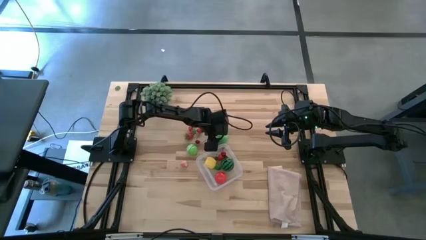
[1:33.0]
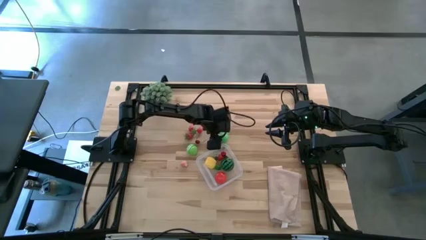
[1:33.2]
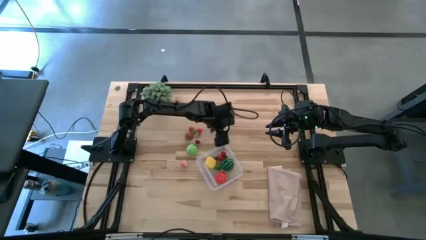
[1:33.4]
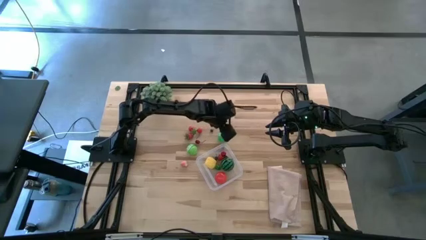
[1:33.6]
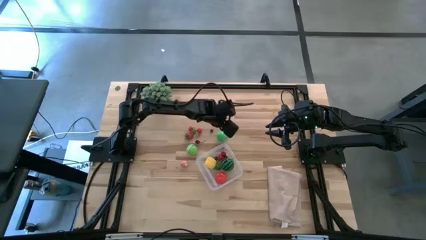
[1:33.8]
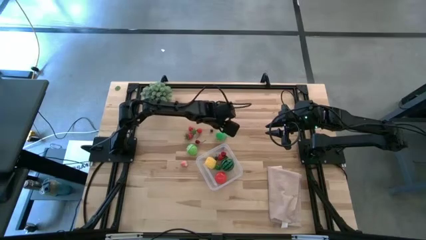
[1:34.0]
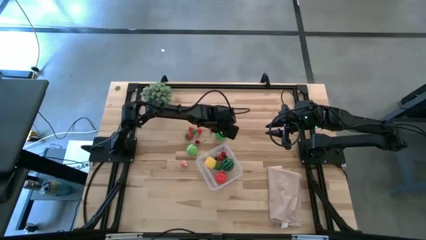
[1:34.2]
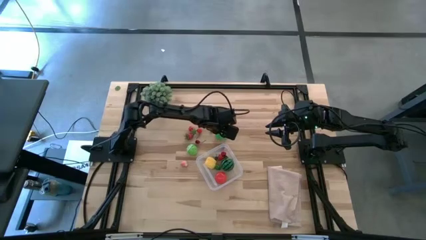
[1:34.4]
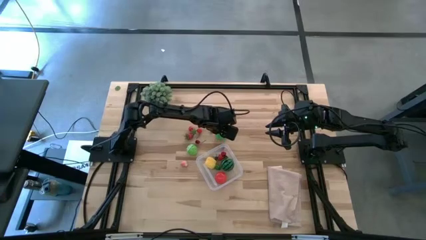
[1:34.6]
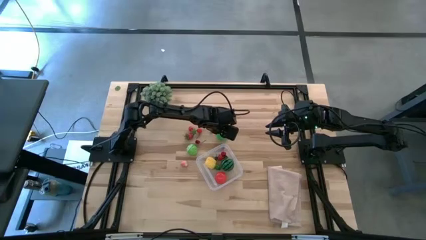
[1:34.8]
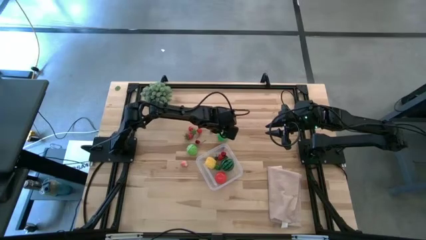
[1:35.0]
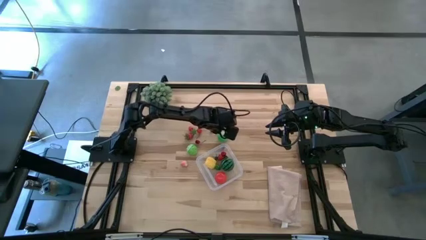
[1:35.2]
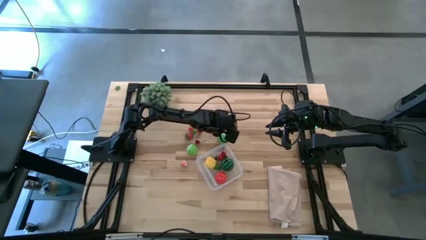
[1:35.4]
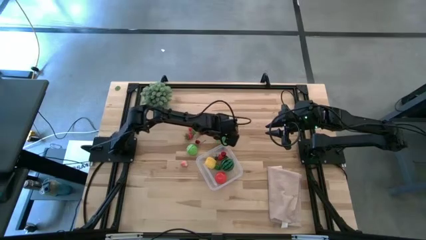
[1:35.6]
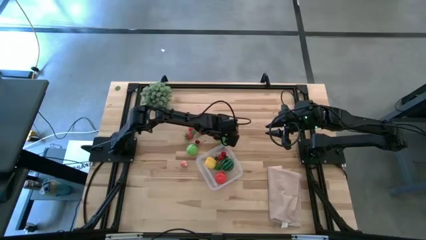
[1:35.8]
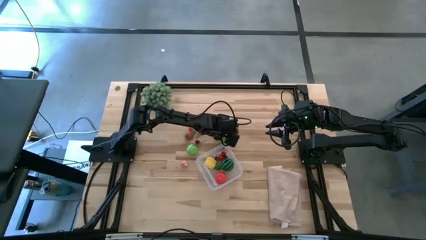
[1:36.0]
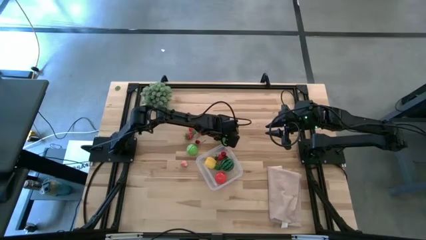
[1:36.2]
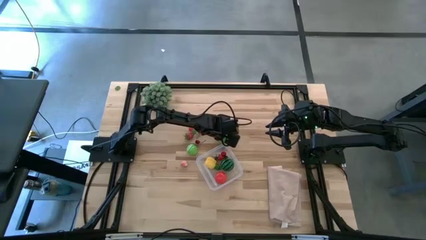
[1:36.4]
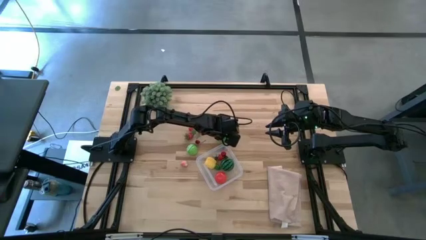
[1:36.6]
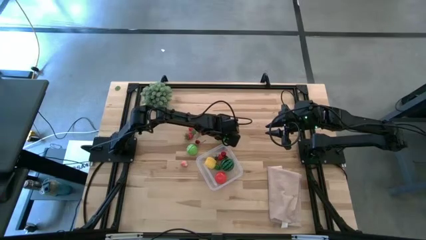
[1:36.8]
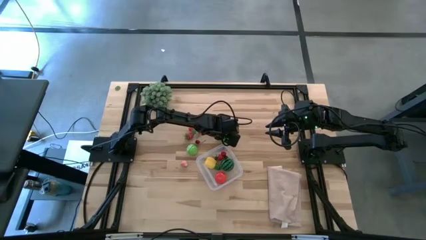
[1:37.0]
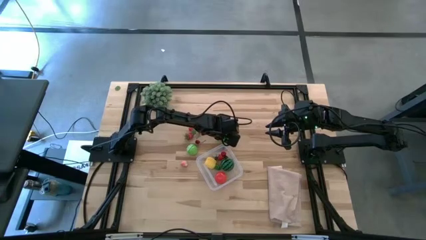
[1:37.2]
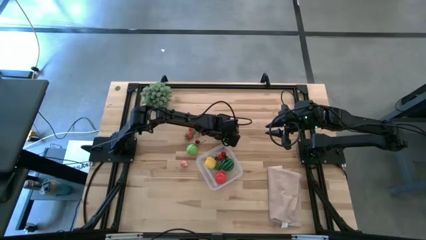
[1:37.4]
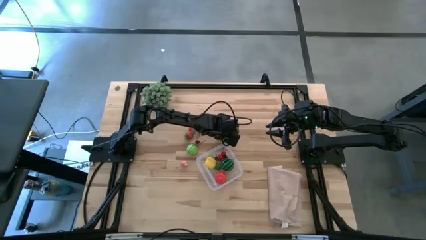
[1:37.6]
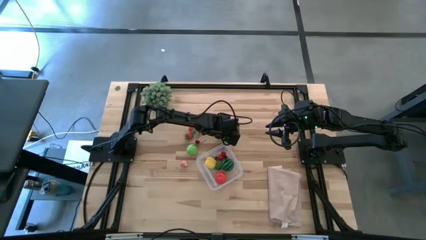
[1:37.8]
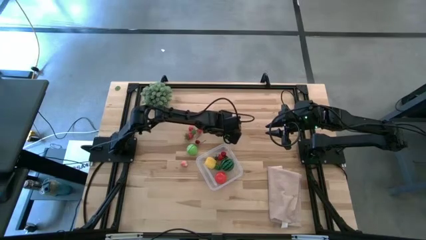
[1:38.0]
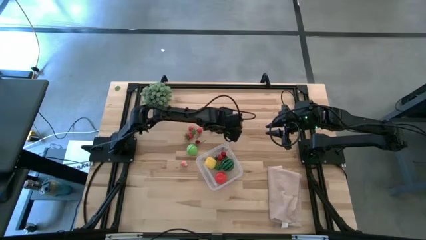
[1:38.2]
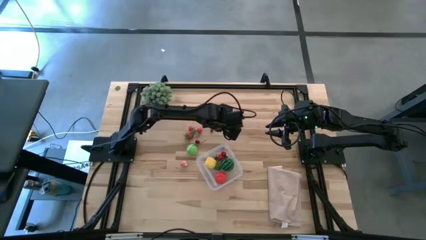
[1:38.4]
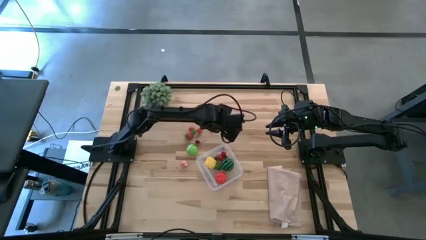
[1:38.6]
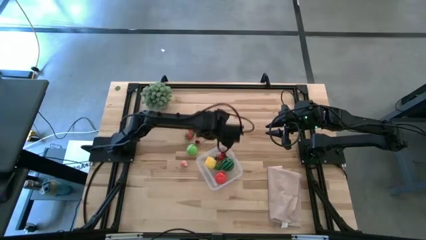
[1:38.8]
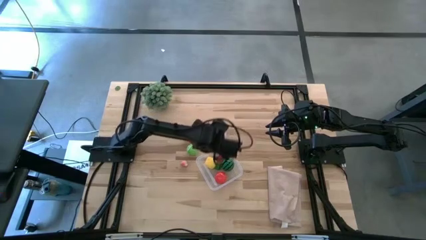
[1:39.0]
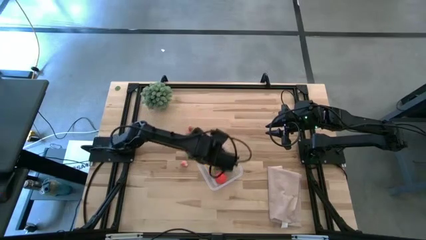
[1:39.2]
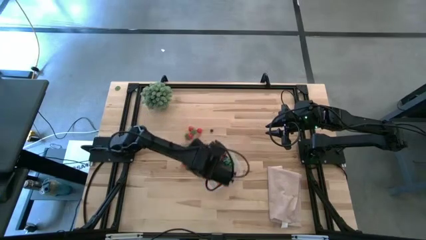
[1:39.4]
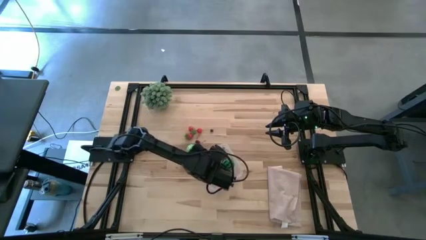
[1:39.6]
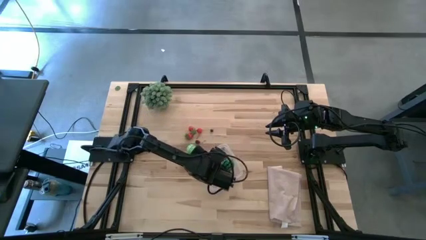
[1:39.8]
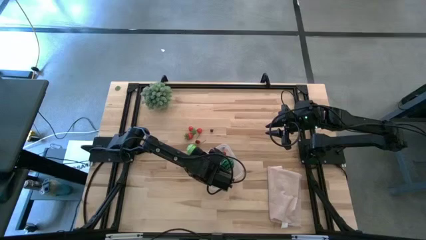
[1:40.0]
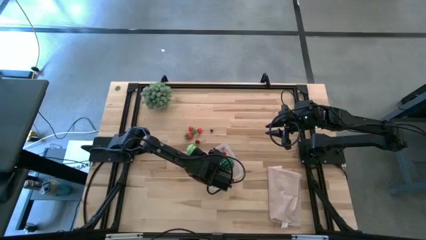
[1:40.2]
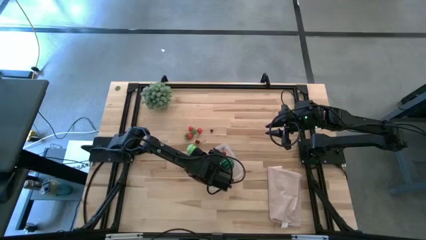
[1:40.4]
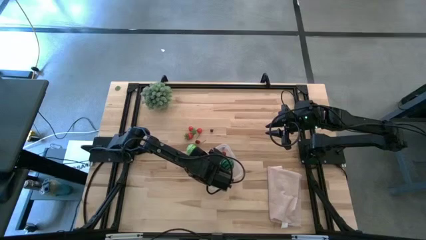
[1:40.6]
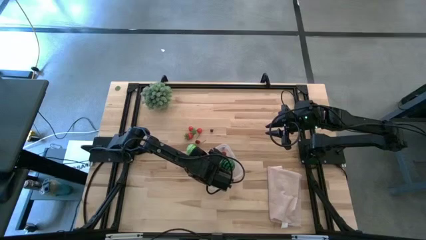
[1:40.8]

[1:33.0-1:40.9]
Task: Pick and placing Produce into tupperware
Put the green pear into the transparent bin

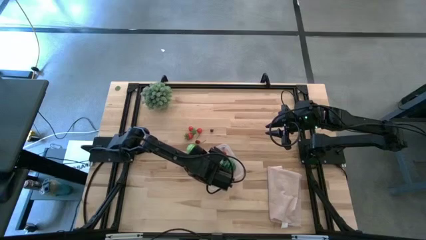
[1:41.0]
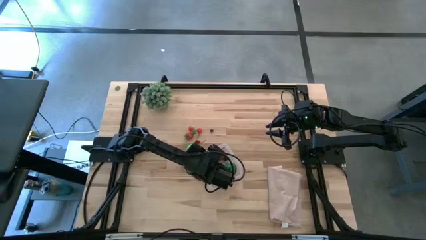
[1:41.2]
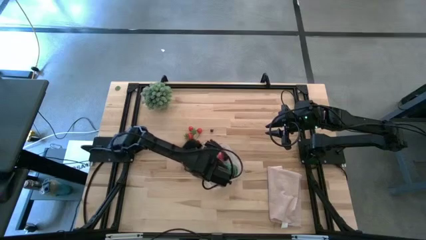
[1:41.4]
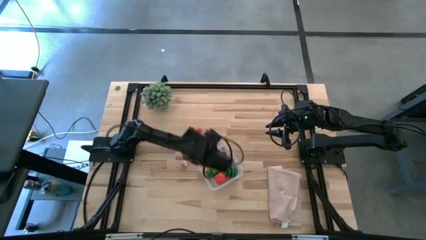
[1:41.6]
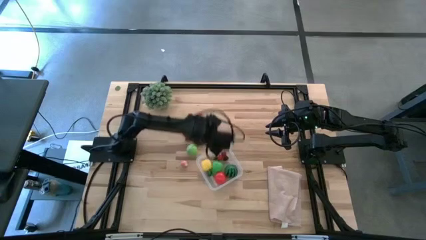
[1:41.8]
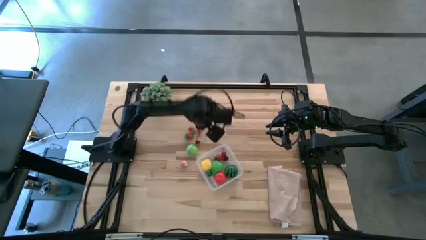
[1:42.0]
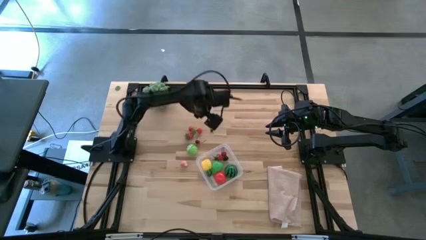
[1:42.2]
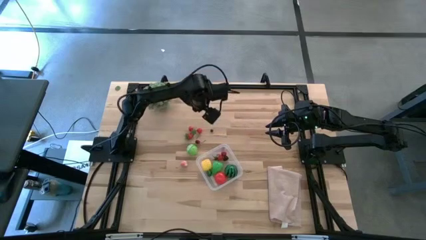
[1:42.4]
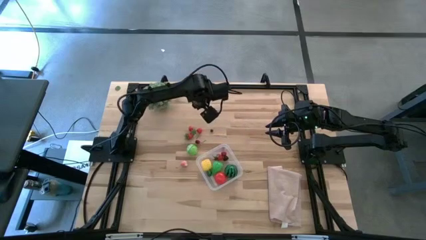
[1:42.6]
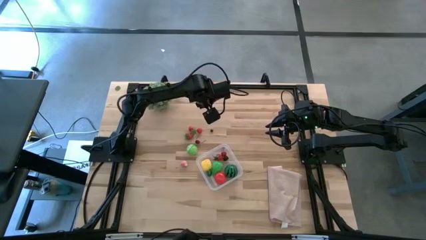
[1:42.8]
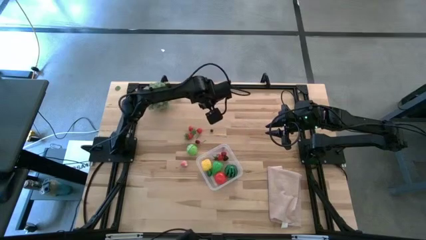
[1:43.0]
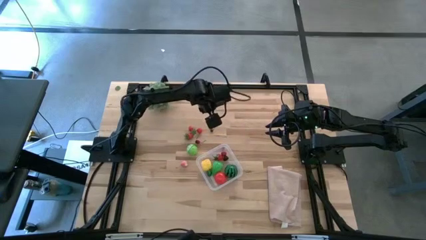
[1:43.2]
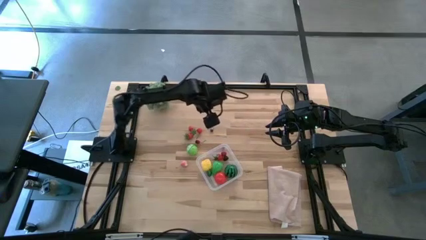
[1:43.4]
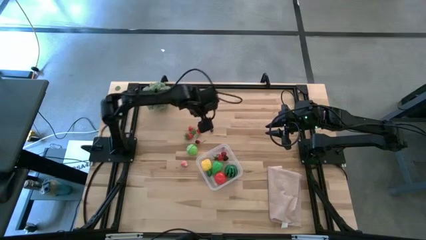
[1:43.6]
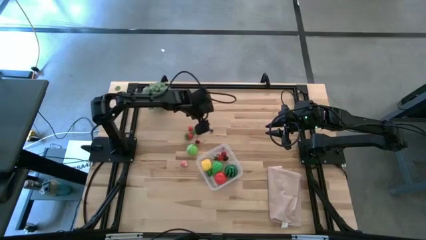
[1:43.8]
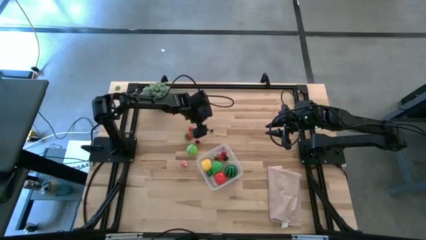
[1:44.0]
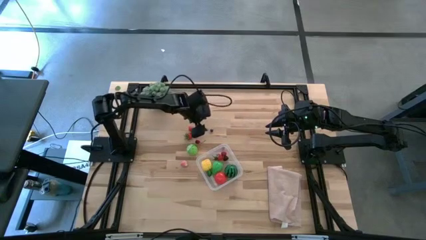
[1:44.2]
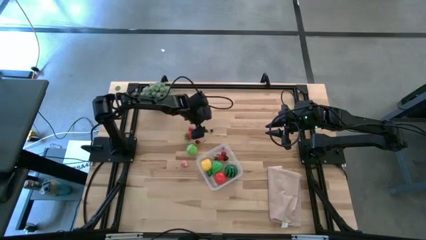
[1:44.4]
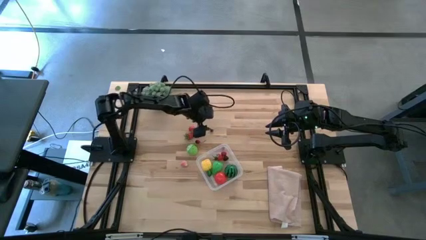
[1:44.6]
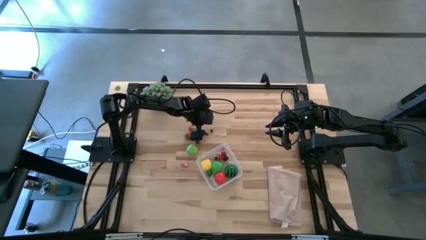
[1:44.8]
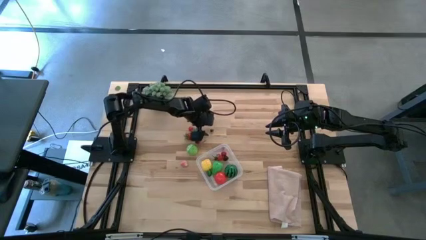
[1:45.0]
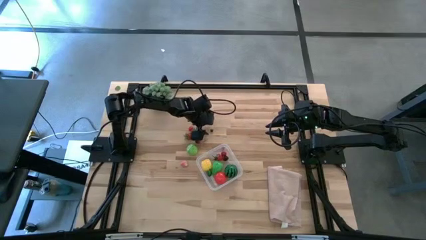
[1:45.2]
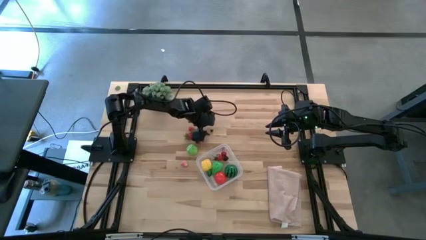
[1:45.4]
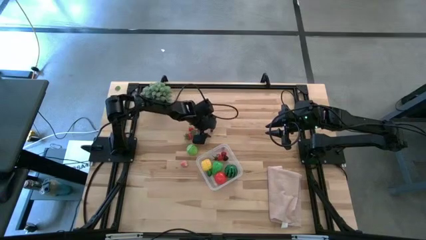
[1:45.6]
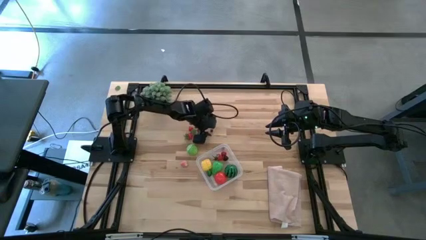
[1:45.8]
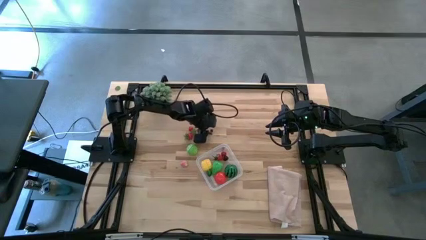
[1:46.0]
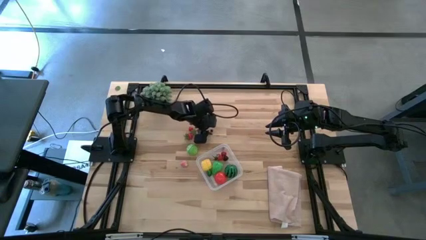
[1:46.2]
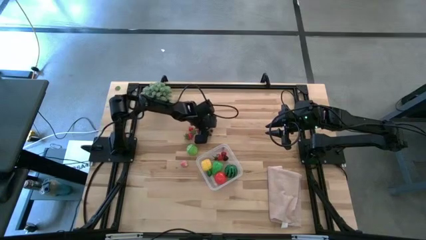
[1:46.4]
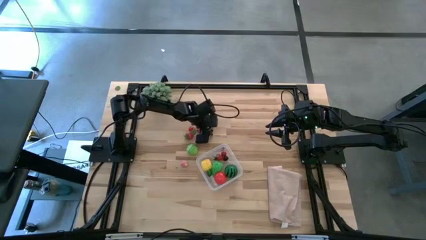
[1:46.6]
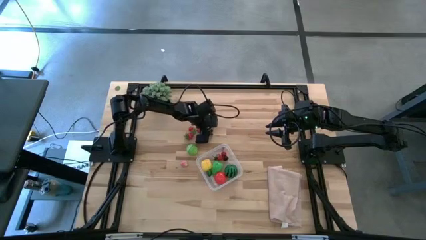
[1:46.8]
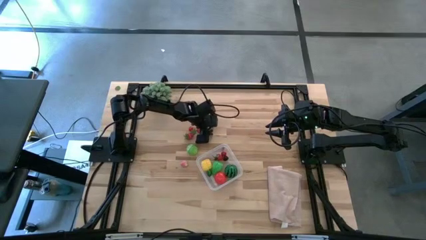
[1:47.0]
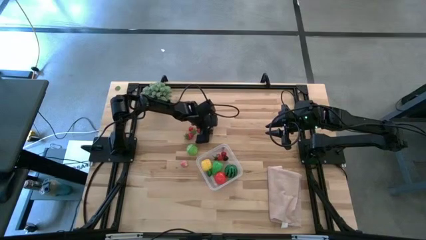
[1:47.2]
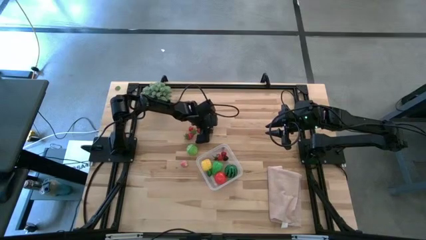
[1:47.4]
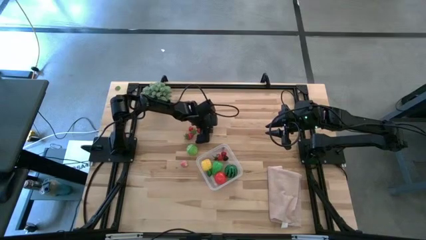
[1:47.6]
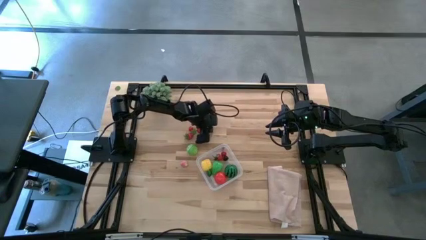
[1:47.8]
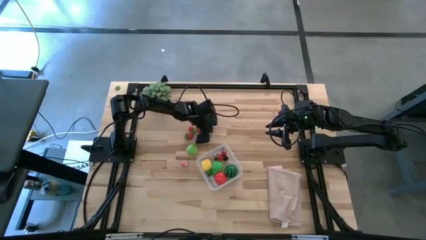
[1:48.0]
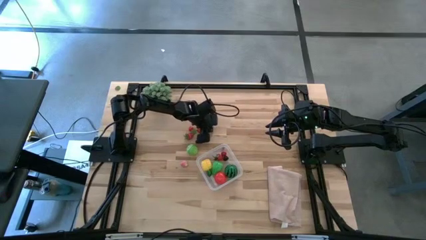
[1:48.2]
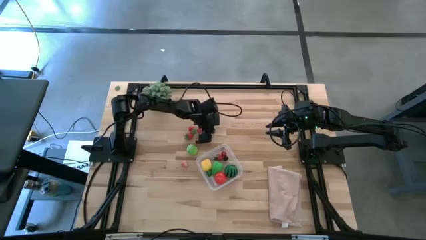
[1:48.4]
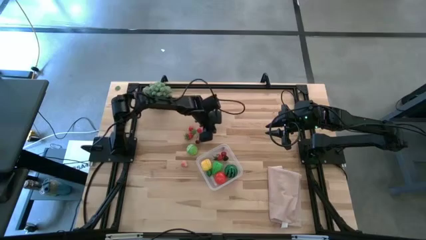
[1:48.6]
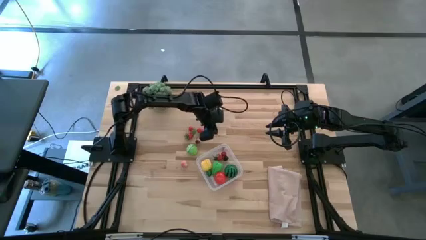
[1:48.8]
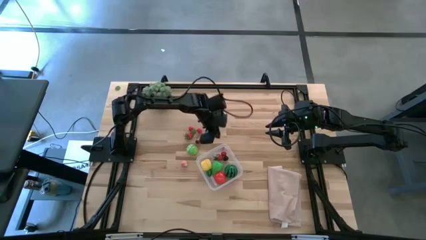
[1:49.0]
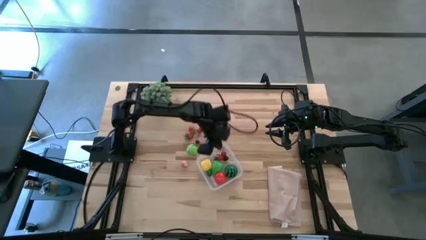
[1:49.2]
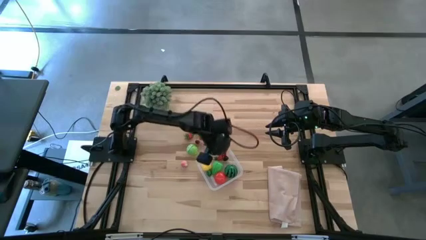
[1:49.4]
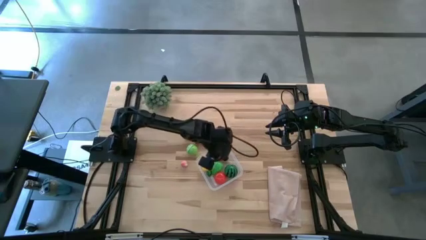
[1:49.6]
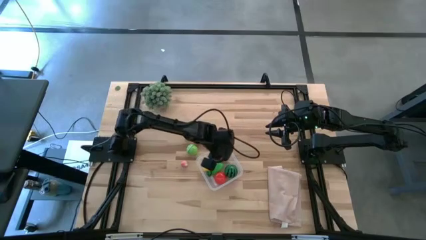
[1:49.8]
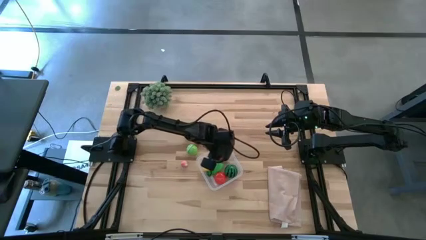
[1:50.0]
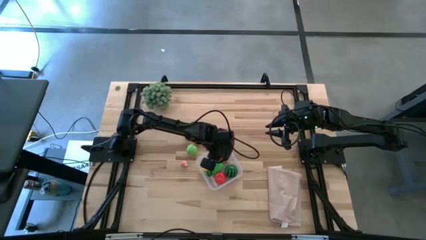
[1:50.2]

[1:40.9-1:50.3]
Put the blueberry into the transparent bin
